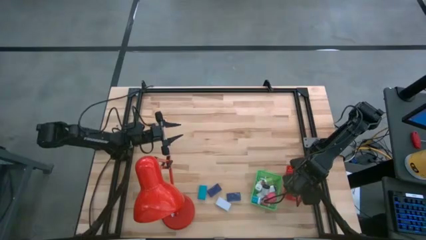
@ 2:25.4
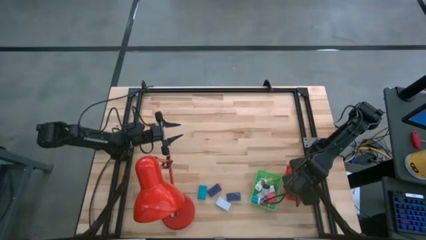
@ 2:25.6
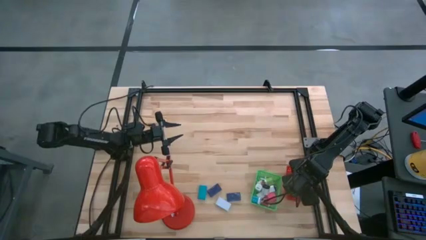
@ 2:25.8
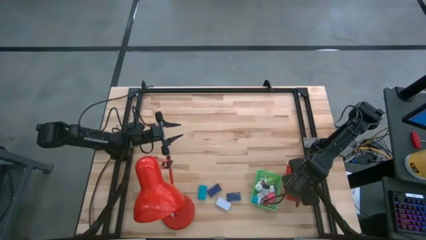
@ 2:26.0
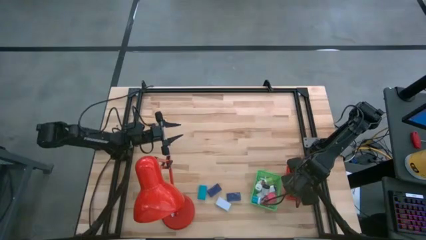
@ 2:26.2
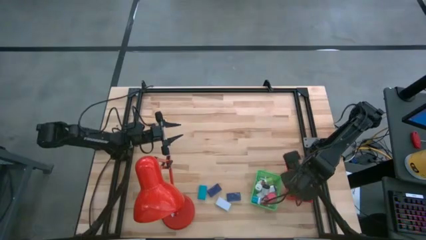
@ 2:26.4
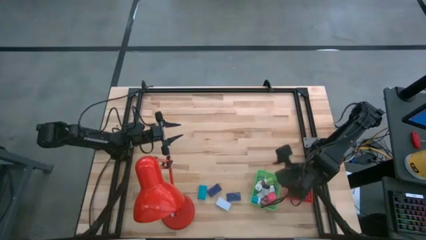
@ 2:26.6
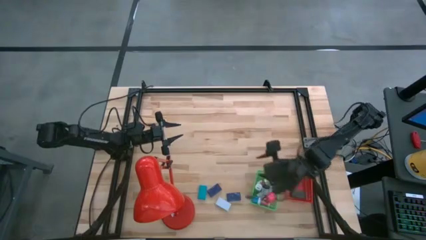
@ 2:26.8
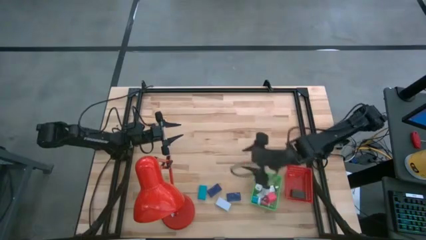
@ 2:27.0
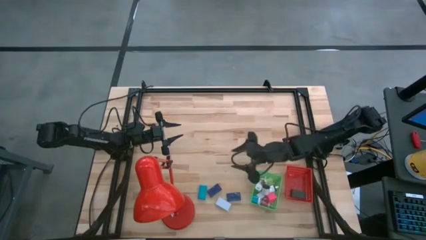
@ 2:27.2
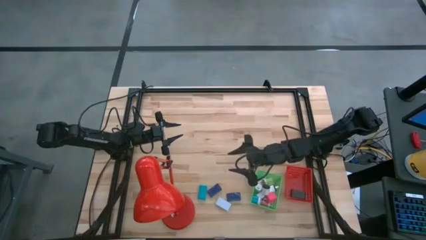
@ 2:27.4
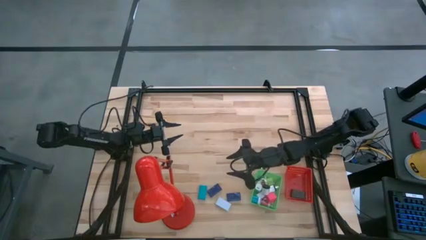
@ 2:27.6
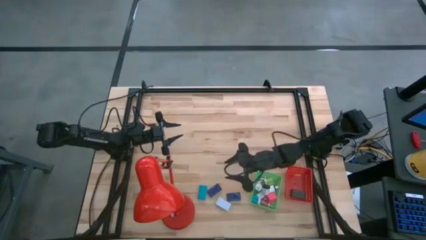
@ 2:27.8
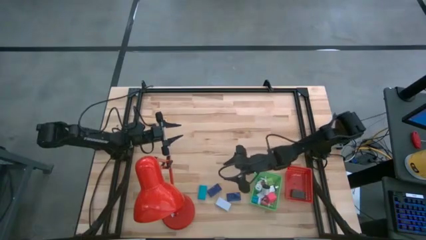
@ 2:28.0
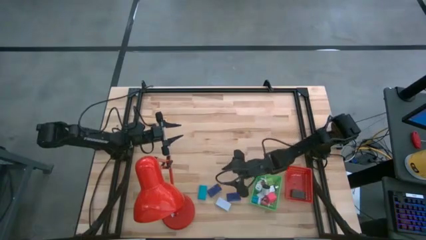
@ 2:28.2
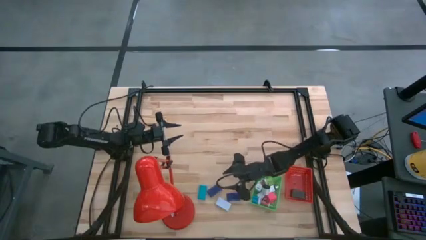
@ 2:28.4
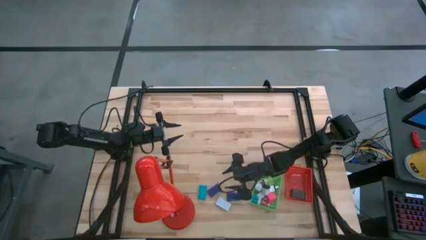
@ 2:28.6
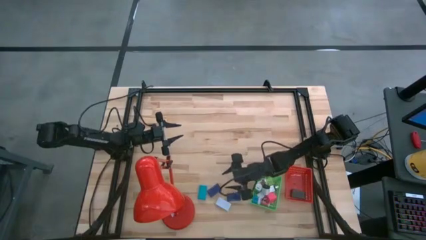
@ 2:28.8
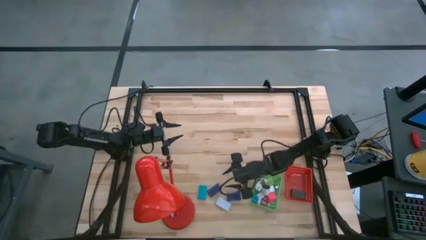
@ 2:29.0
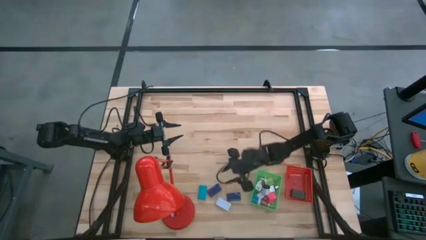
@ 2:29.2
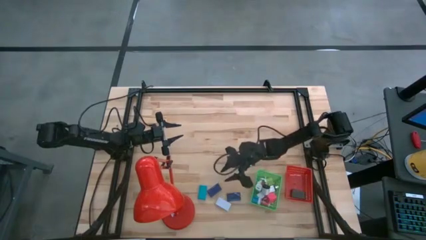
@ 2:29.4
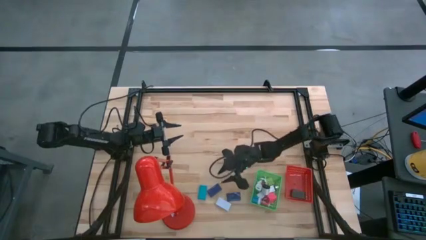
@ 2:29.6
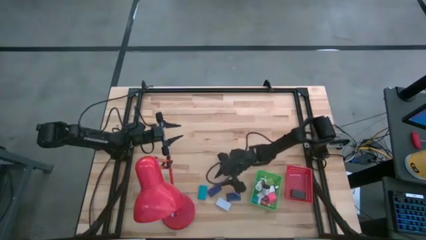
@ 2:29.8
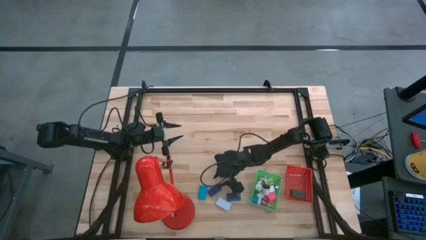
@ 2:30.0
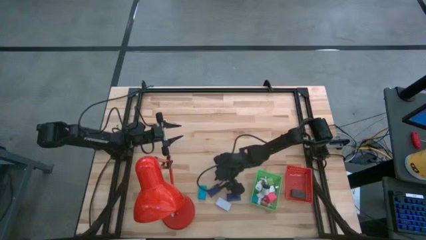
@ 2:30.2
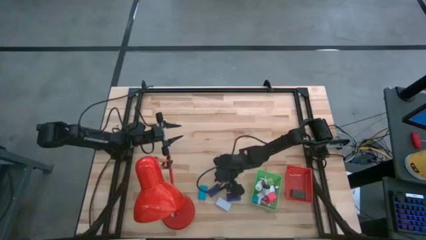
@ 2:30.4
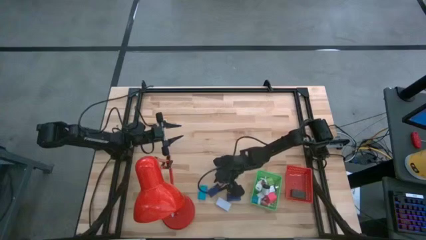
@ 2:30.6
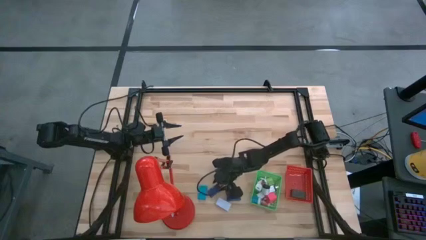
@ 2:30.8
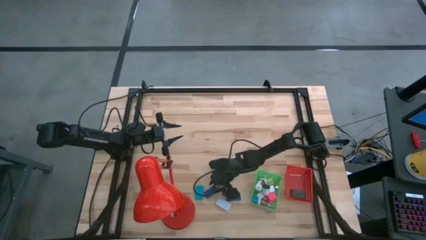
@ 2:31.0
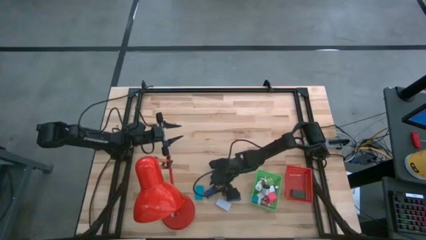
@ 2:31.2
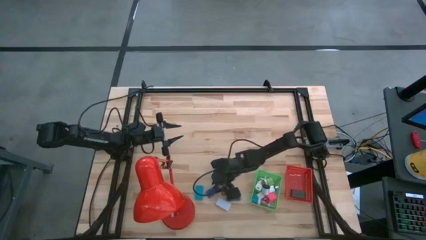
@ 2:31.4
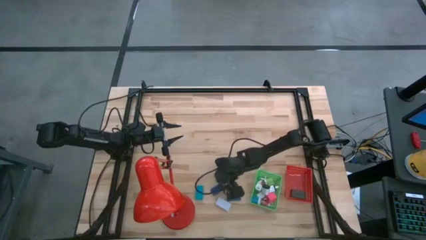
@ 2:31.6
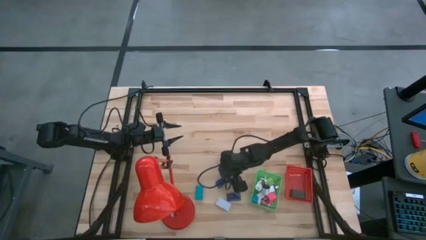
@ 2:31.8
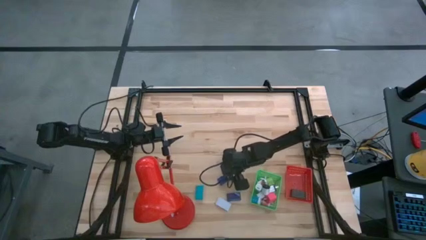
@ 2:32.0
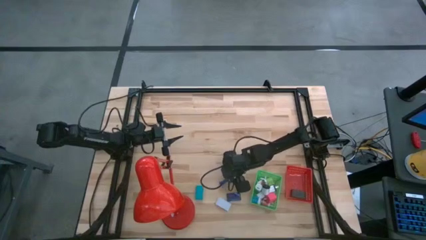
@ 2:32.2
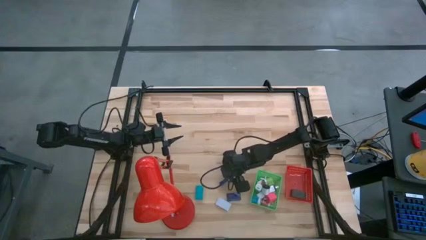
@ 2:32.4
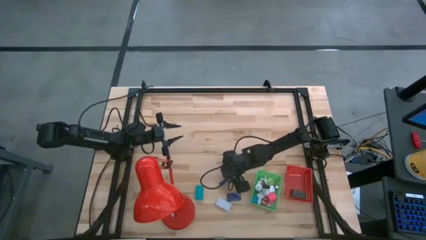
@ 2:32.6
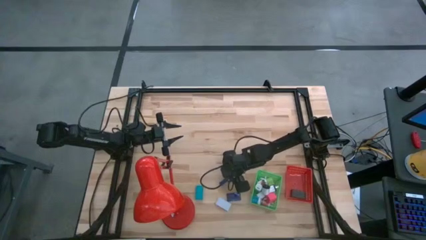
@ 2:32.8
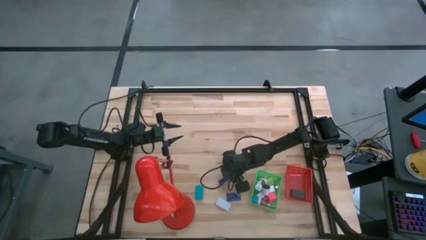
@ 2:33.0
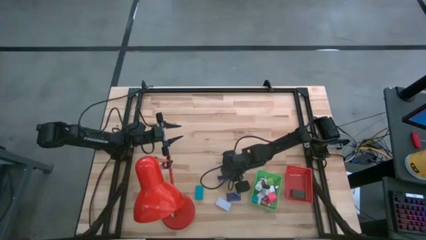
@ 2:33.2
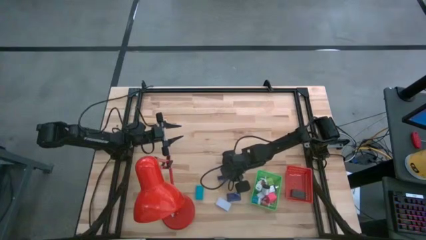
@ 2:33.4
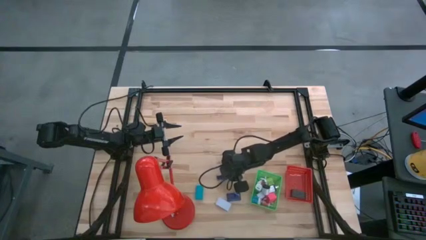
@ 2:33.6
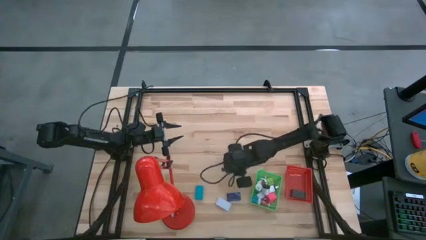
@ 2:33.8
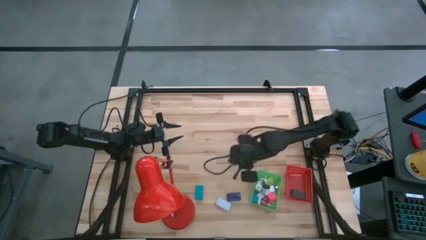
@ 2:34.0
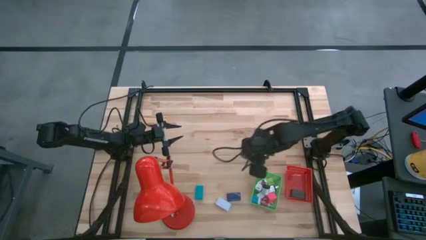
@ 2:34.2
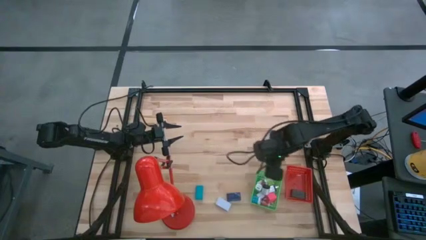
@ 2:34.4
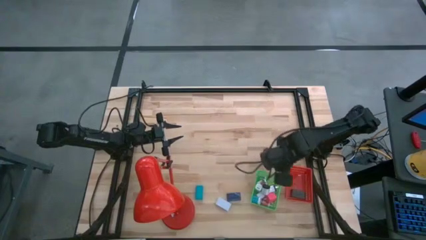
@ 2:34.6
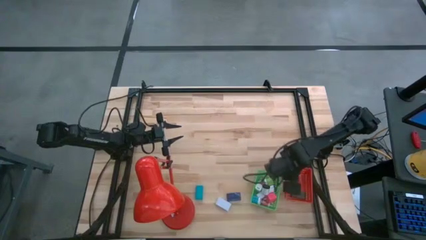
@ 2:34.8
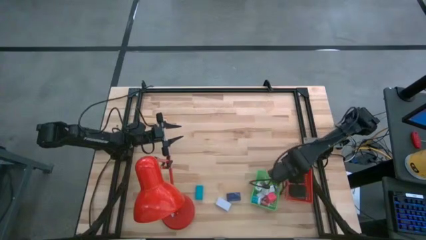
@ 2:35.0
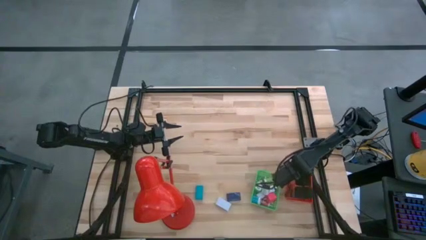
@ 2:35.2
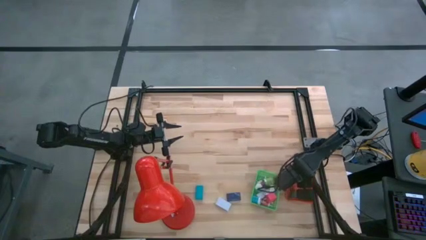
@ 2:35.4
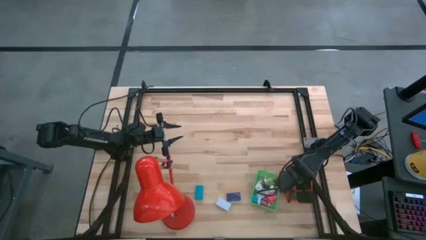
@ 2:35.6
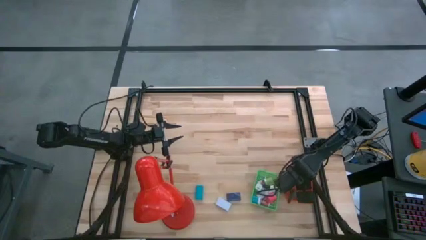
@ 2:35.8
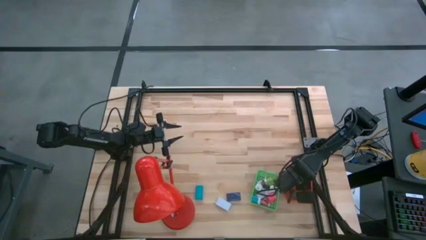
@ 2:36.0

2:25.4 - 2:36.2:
Task: Pick & Place Office items
Put the dark blue digital clock into the red basket

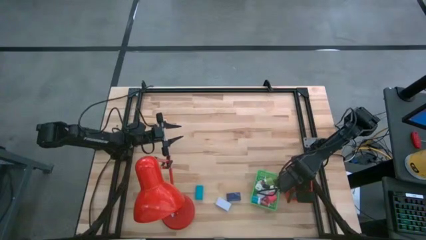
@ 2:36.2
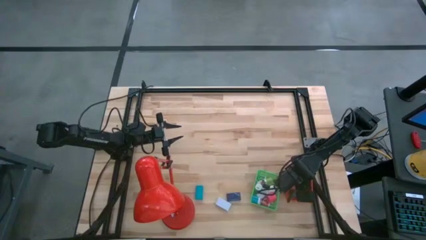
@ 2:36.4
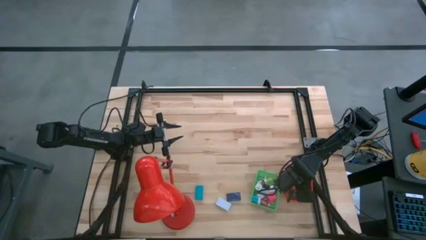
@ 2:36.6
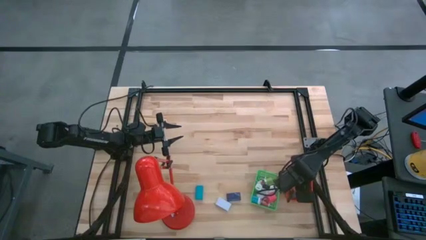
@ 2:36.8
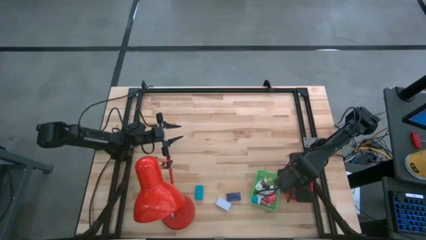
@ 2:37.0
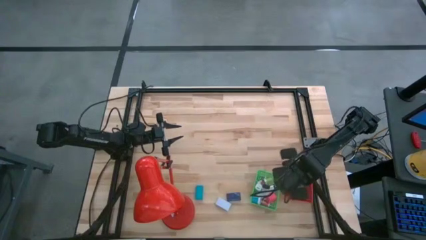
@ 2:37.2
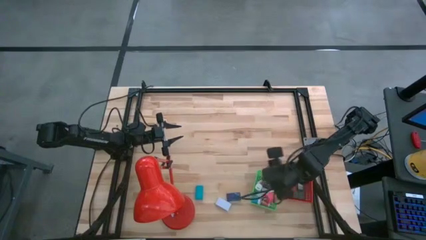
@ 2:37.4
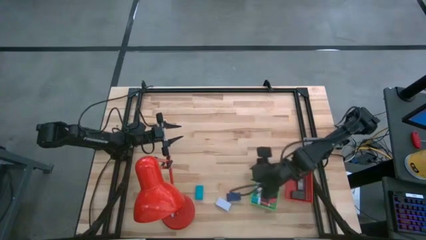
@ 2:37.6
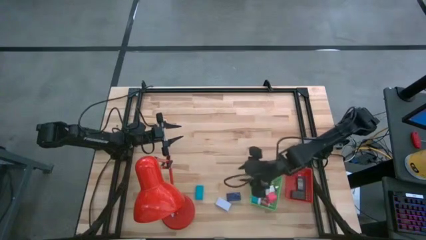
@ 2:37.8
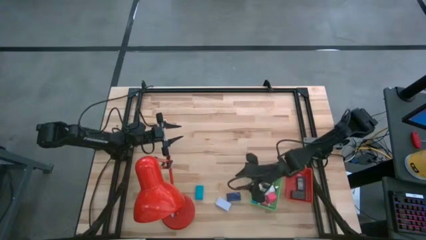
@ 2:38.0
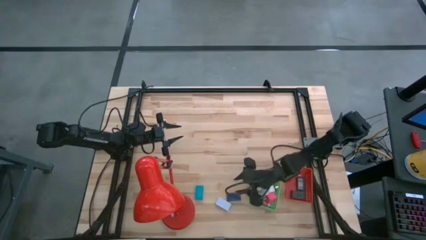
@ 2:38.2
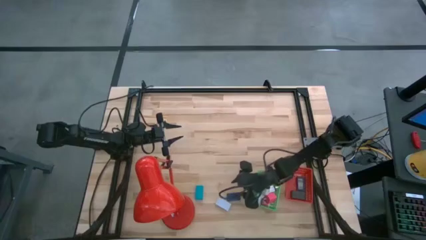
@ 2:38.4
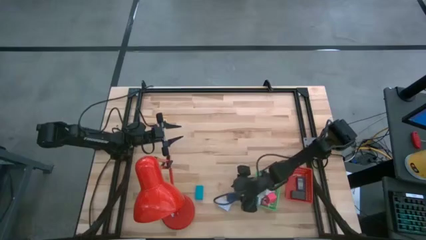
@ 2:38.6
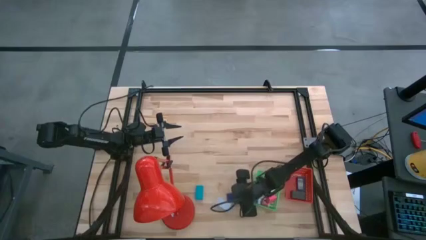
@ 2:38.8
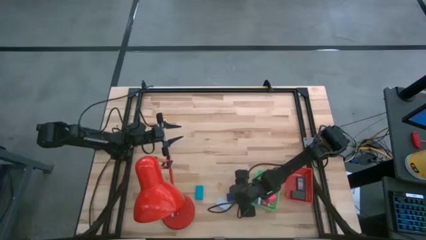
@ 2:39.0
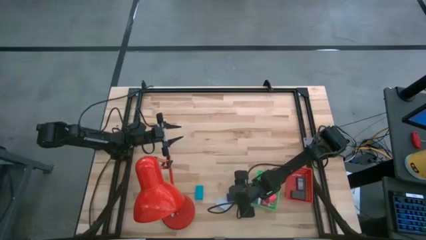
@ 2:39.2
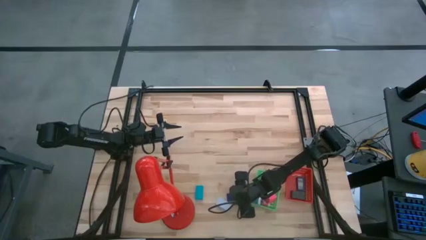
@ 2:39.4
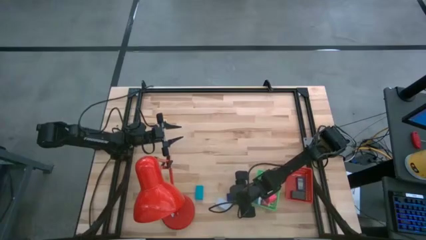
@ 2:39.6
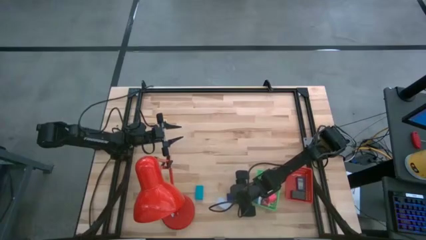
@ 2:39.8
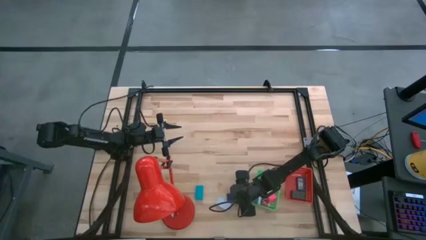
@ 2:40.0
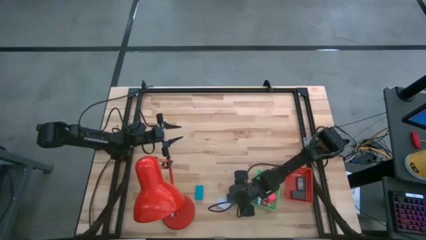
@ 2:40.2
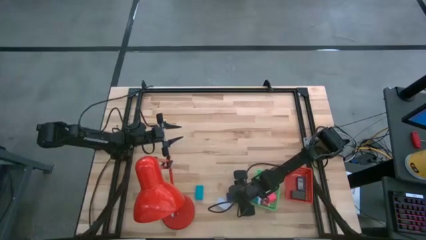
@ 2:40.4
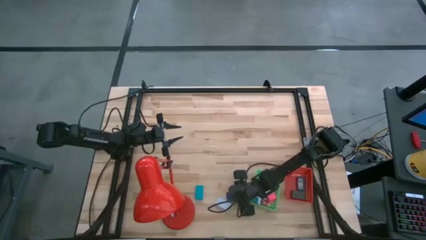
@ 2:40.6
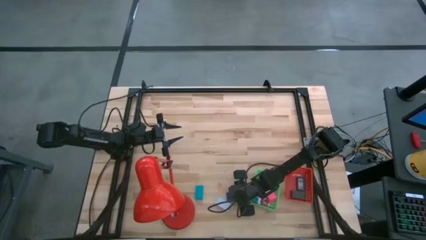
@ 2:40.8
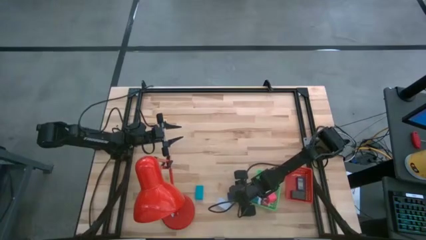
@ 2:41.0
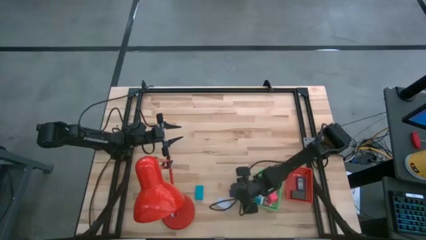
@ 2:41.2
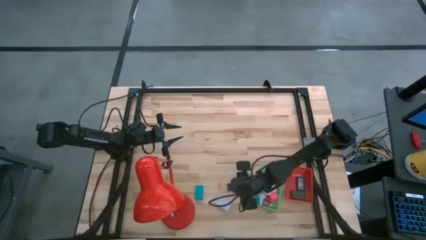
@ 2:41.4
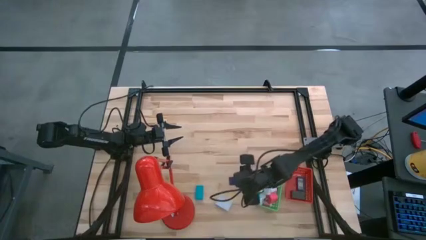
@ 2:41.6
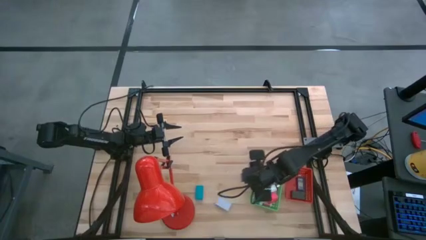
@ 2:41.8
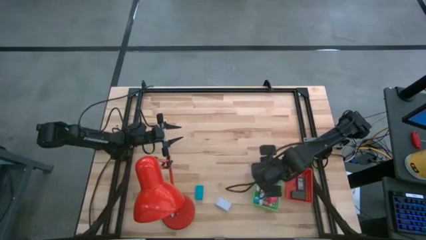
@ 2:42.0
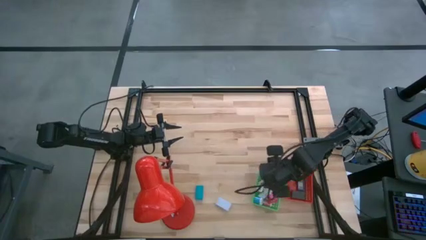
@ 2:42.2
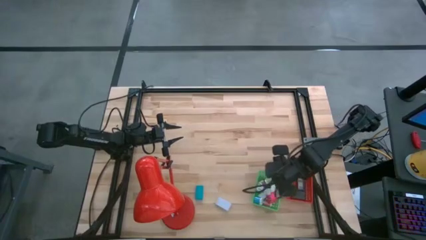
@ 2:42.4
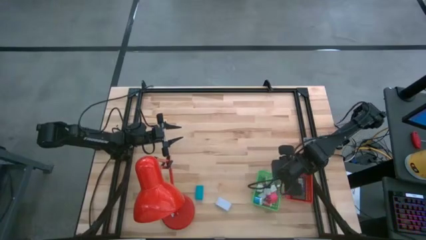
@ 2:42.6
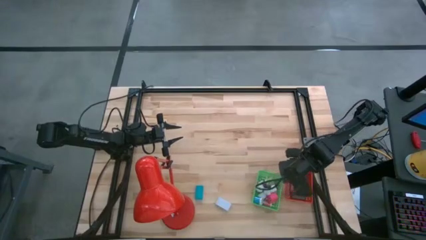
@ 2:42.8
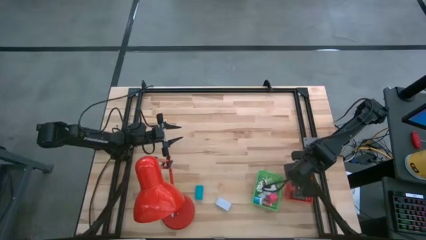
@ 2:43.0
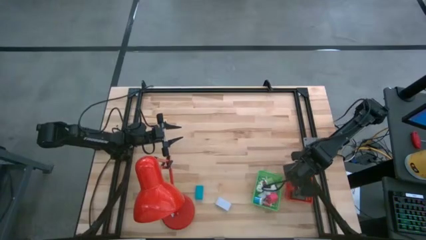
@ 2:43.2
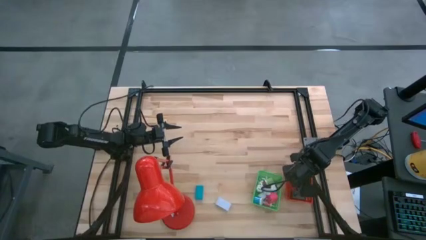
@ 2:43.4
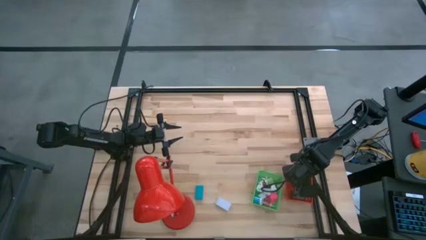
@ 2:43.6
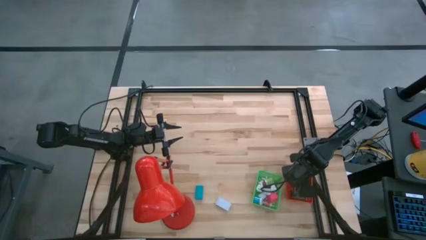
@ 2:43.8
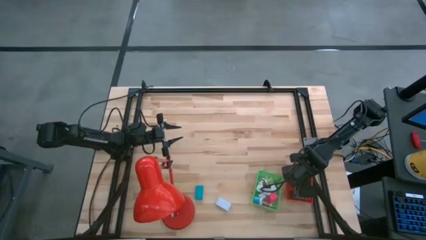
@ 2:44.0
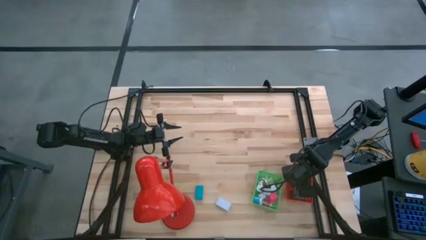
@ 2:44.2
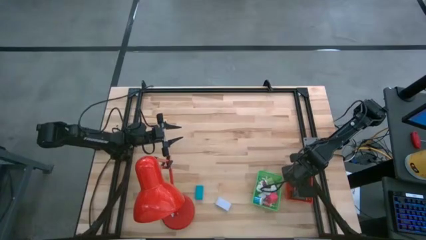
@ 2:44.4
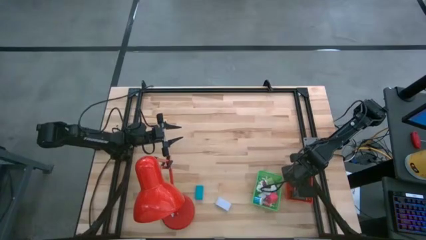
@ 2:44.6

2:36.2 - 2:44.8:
Put the dark blue digital clock into the red basket
